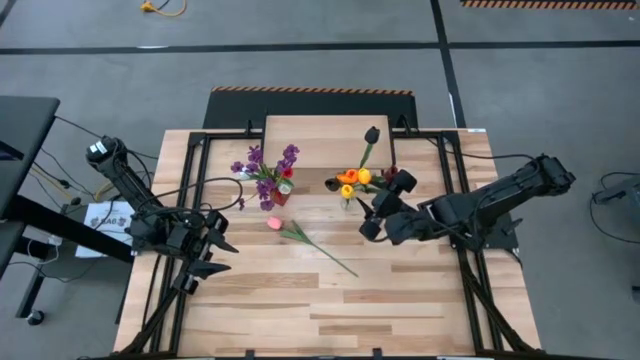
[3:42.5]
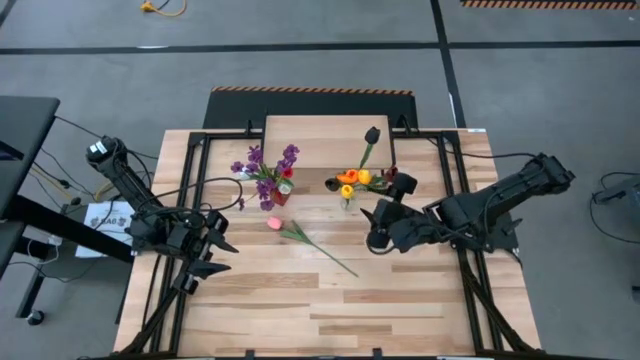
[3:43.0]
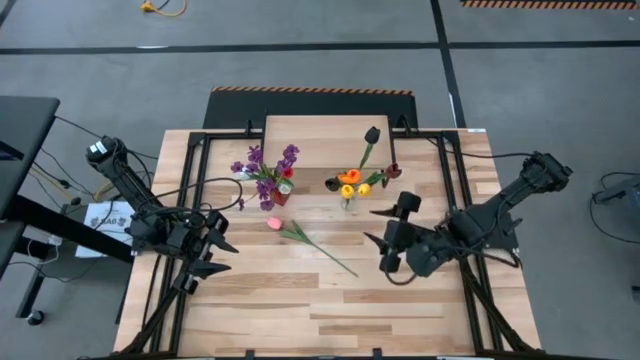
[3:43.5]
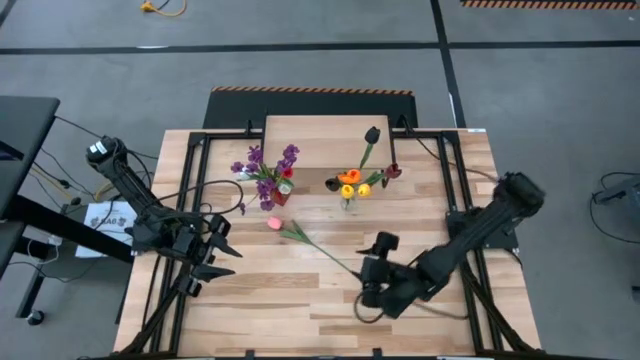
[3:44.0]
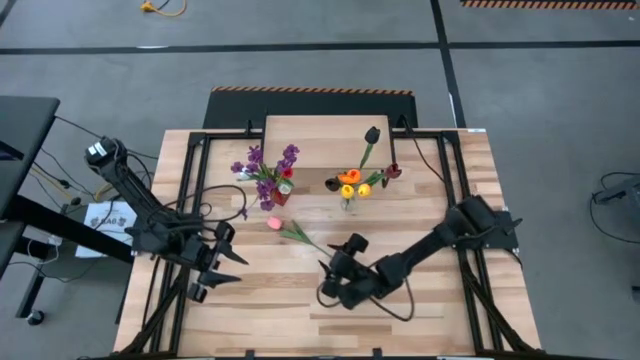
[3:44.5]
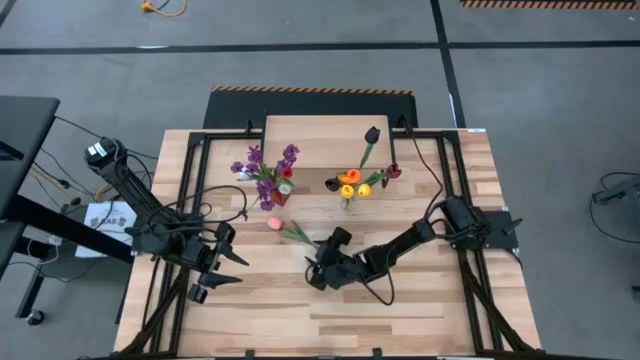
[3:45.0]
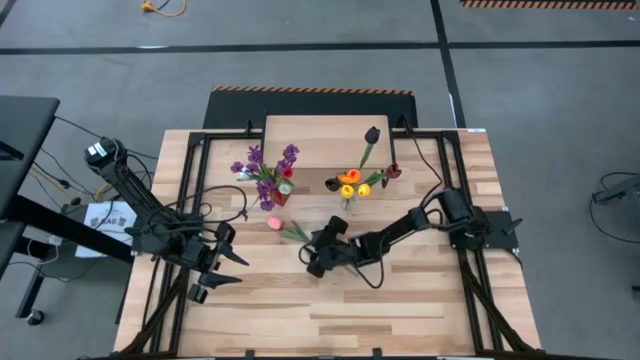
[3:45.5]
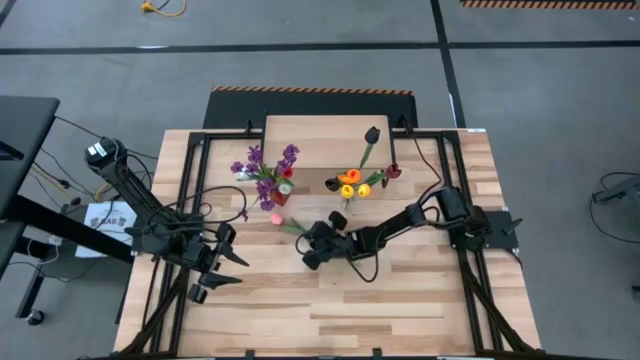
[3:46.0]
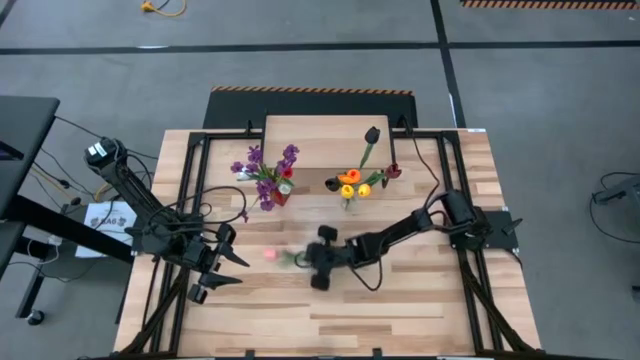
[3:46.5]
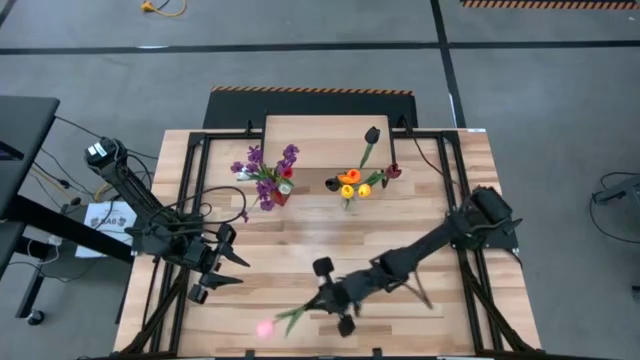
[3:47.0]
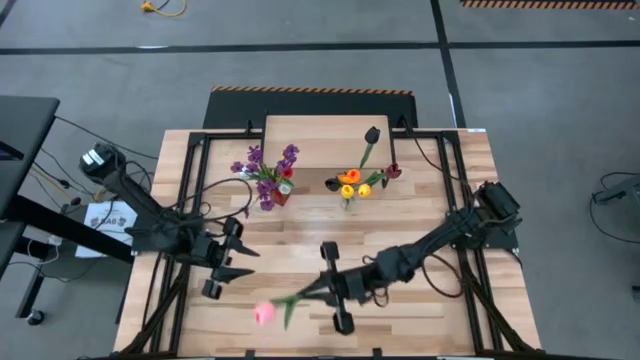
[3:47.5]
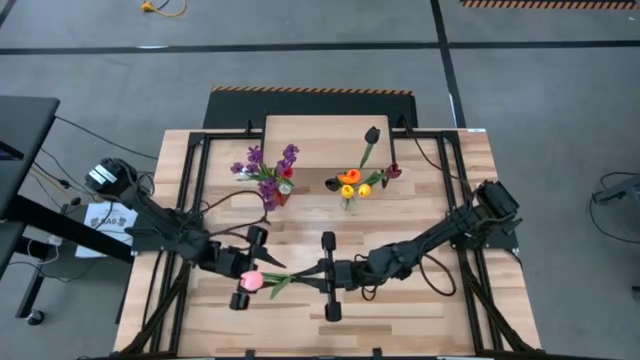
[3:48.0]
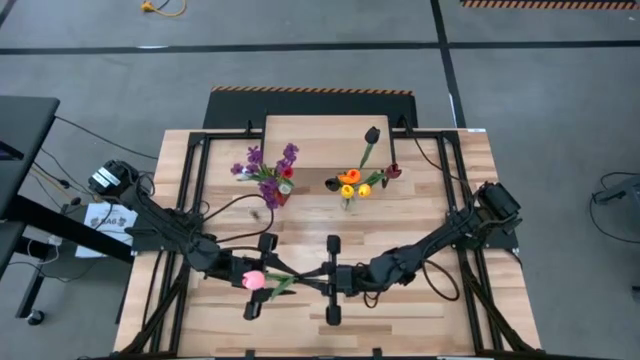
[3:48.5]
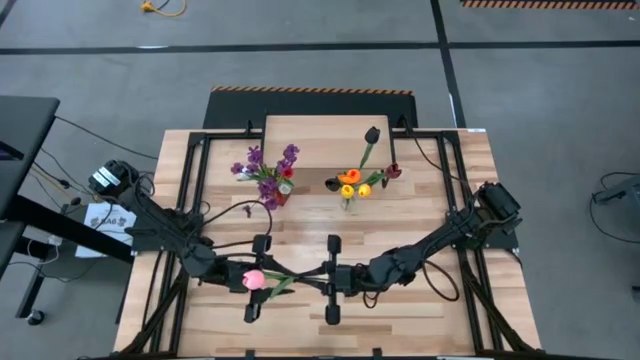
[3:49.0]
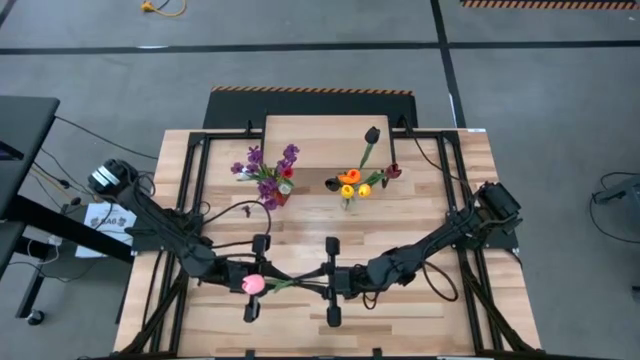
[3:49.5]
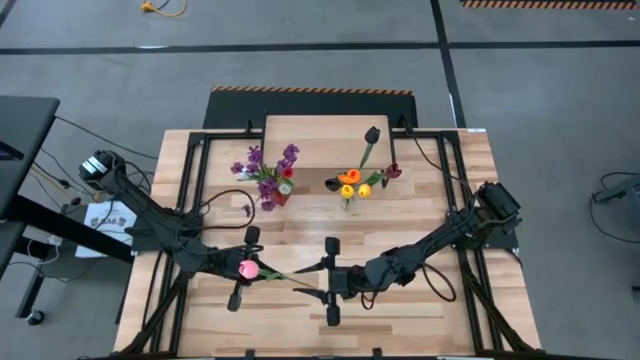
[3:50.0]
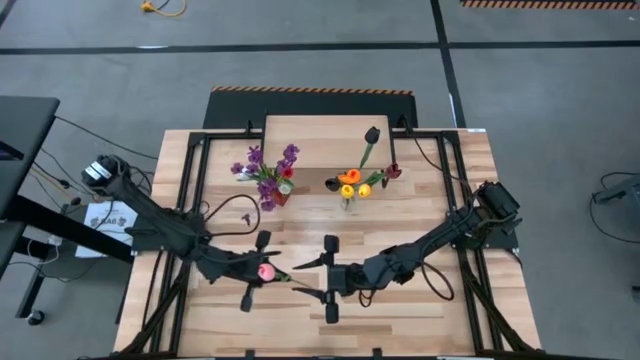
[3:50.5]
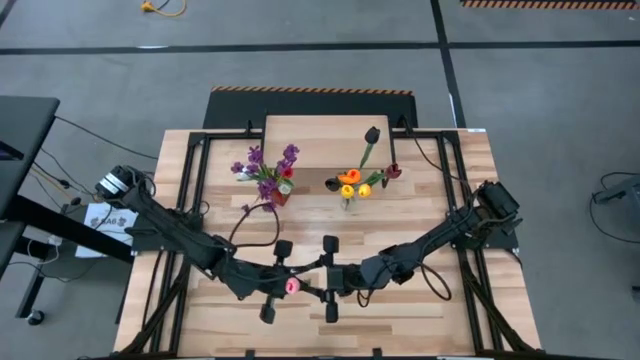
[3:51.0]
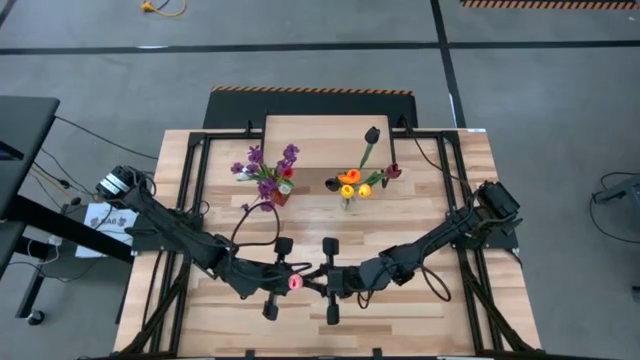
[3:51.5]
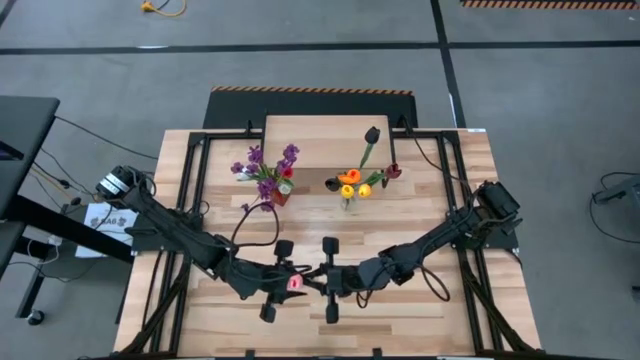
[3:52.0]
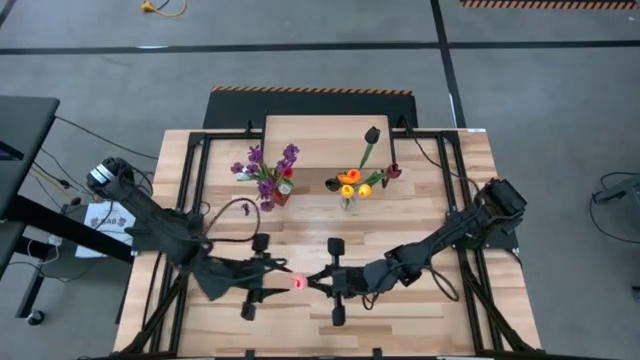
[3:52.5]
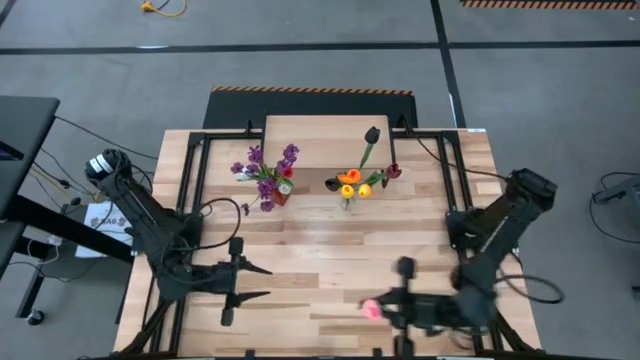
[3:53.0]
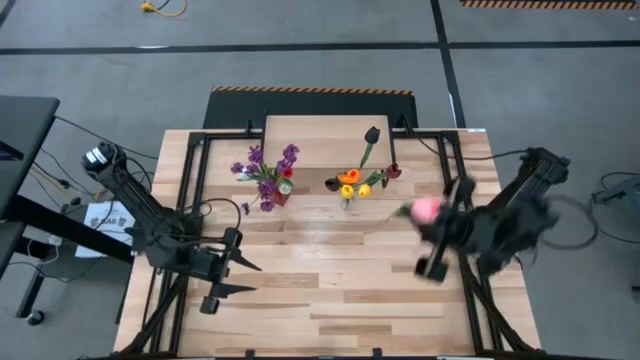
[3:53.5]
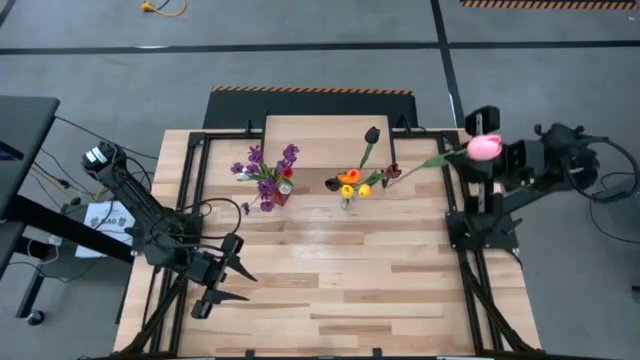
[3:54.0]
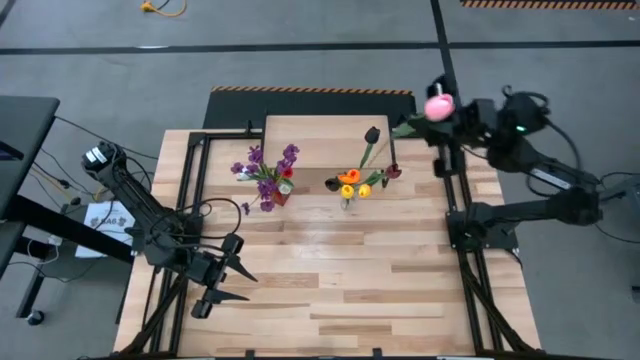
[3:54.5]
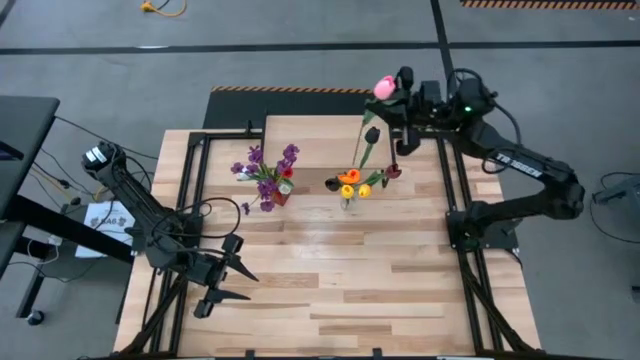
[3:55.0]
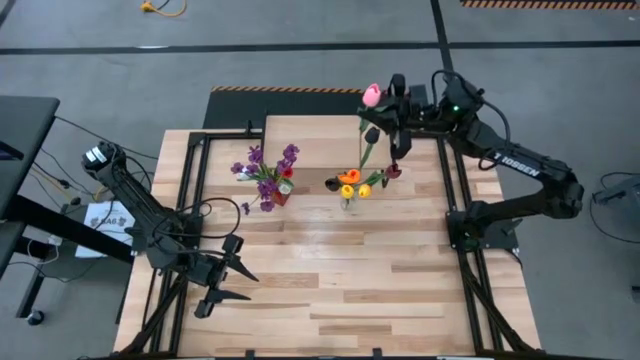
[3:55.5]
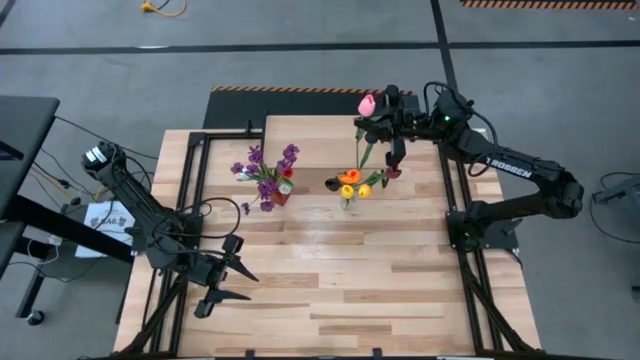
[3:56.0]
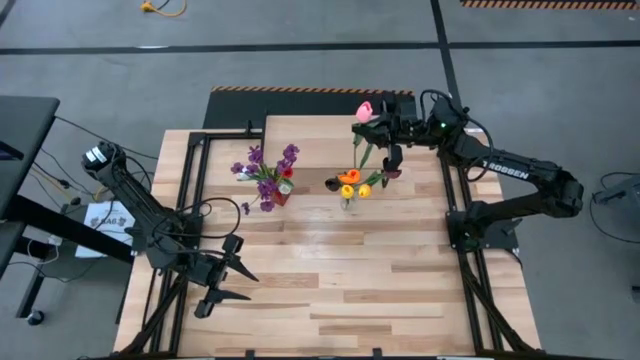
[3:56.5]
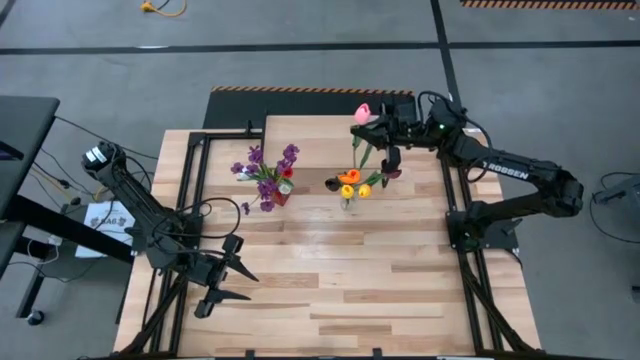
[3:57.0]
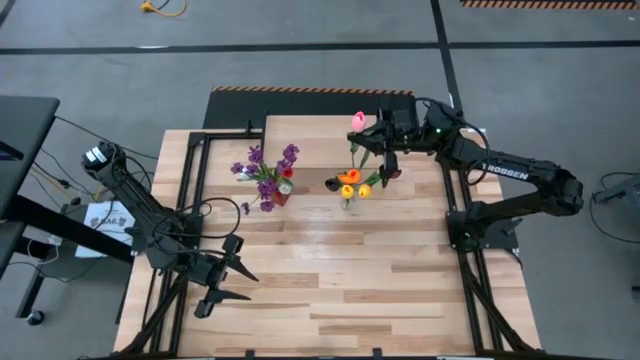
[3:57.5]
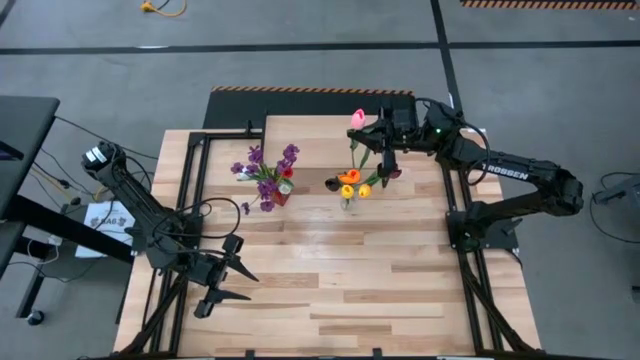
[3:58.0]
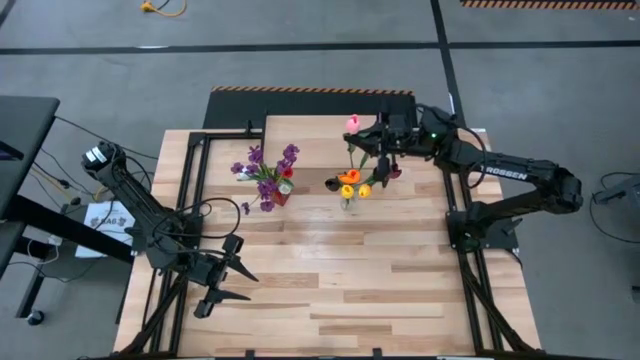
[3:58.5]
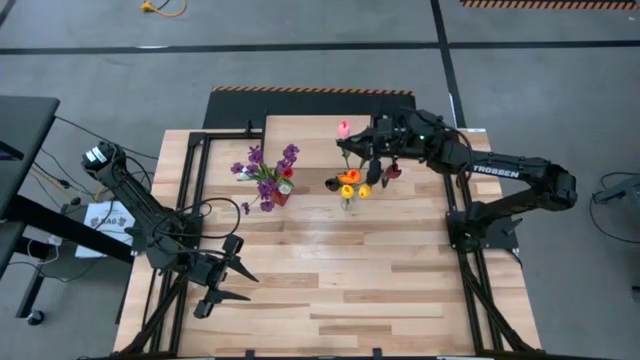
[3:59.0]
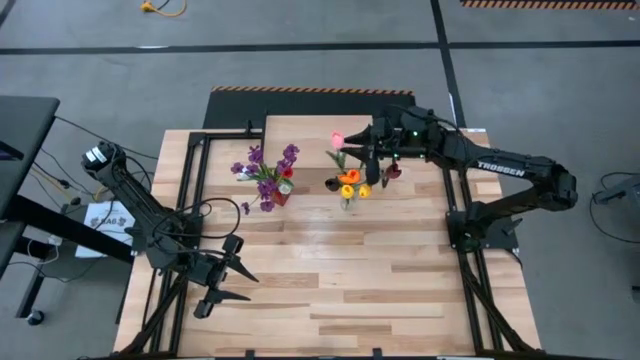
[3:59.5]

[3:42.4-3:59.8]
Task: Pick and place flowers into a vace then onto a shelf
Put the pink flower into the white flower vase

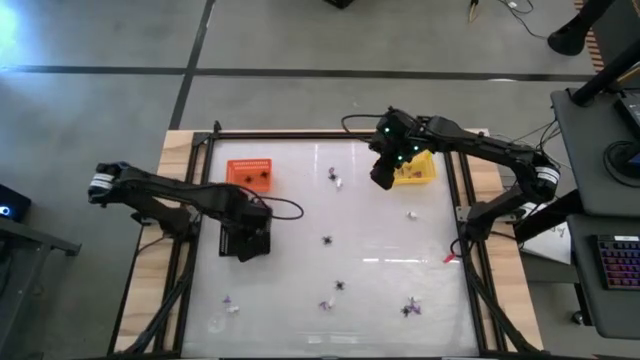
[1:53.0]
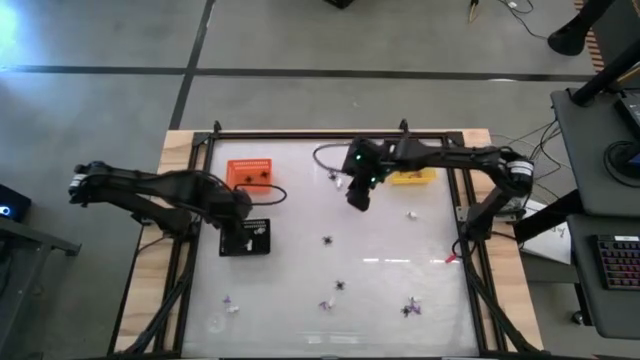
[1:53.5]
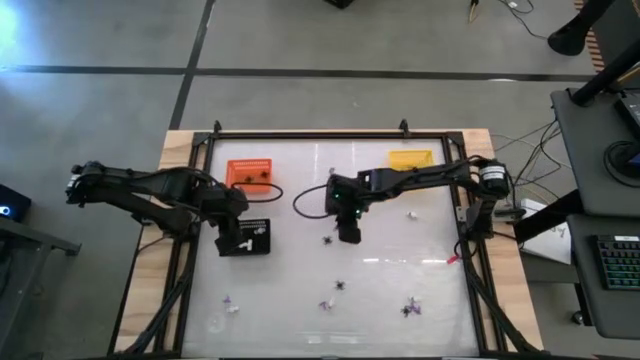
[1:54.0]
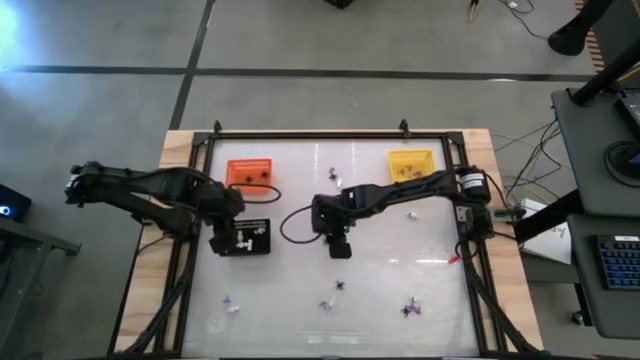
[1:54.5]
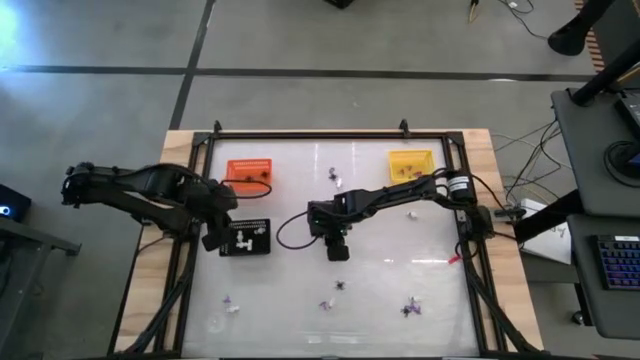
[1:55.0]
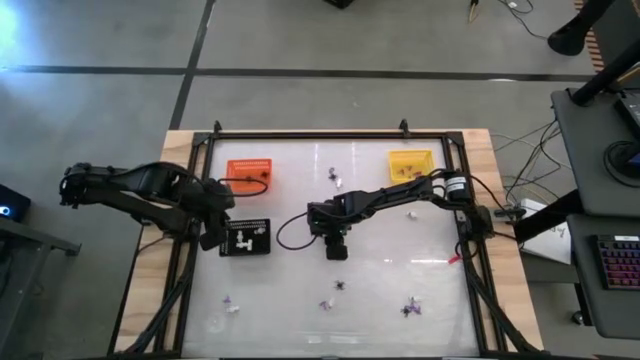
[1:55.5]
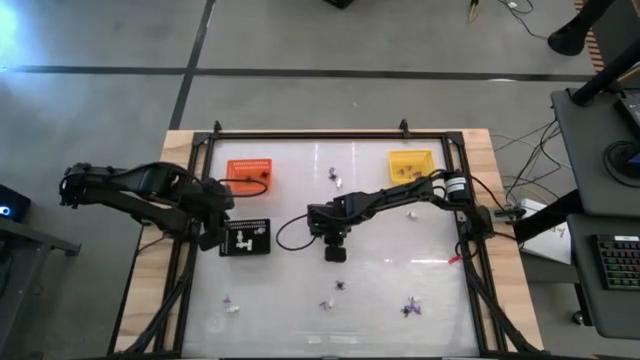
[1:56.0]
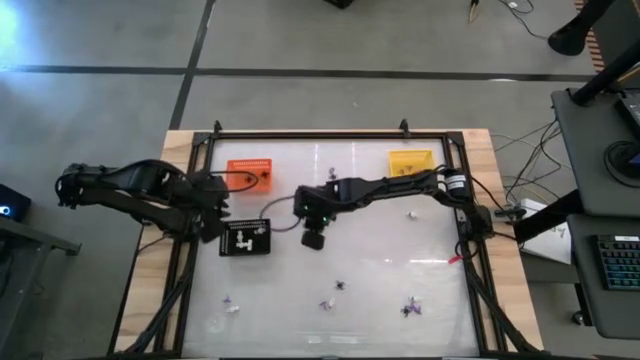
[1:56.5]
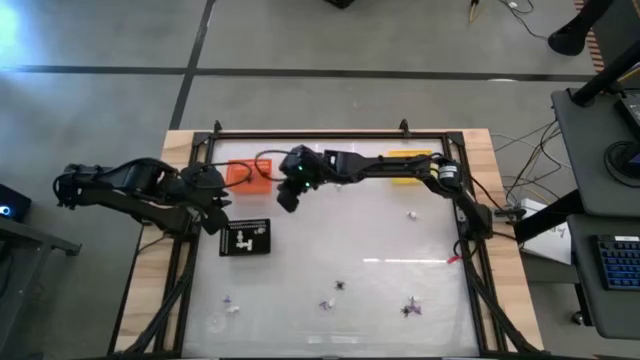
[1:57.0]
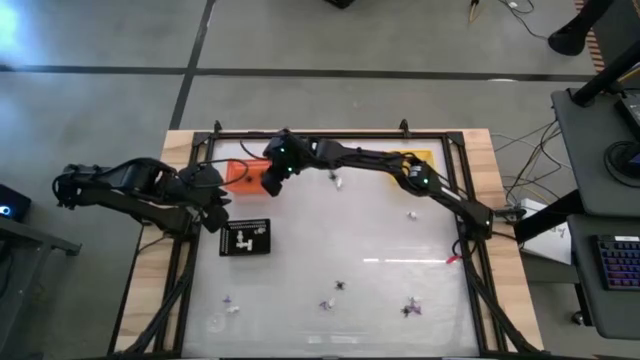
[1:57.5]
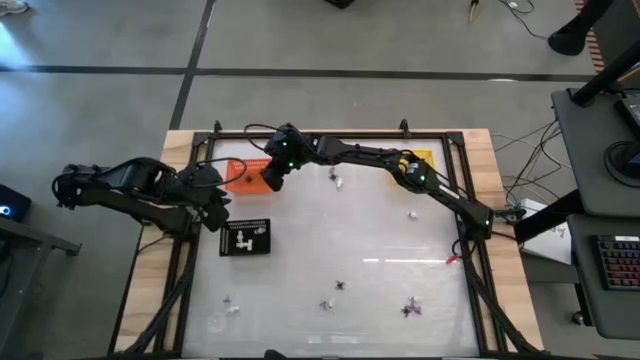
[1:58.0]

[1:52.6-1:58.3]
Task: Sort Halloween decoration
Put the black spider toy into the orange bin
